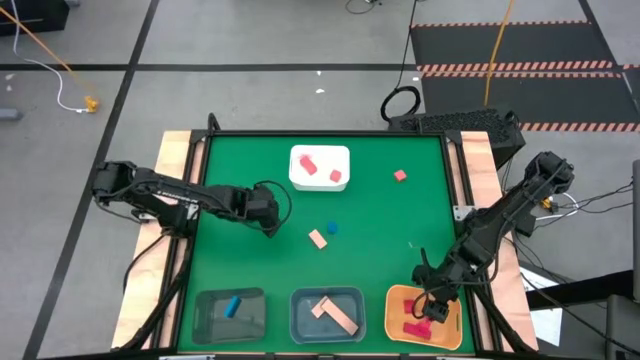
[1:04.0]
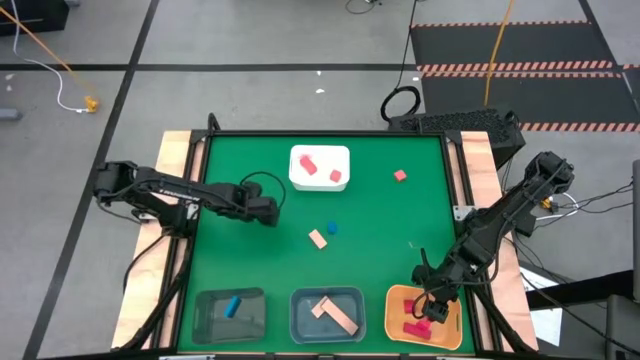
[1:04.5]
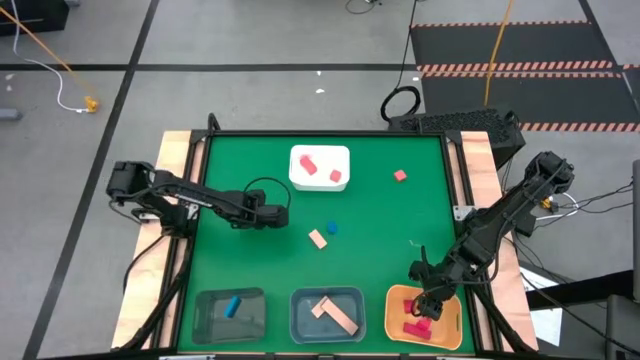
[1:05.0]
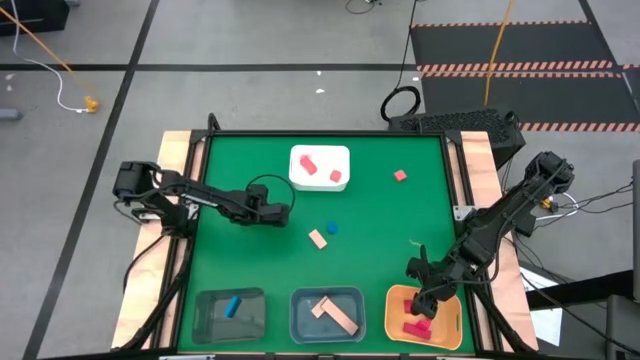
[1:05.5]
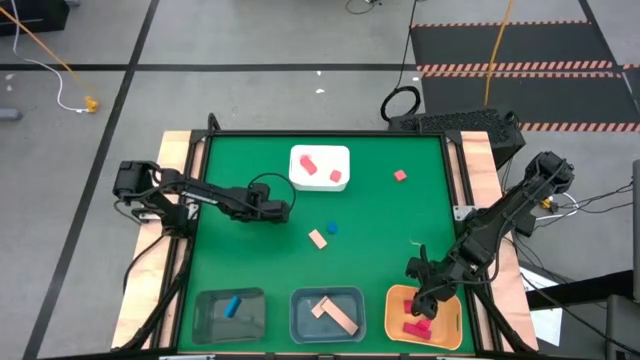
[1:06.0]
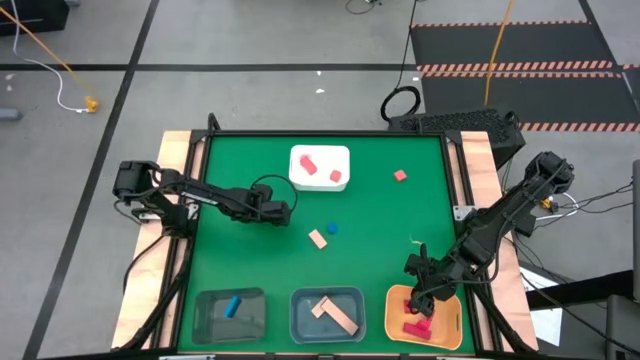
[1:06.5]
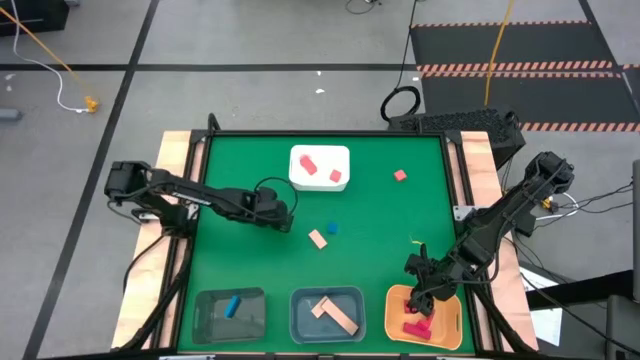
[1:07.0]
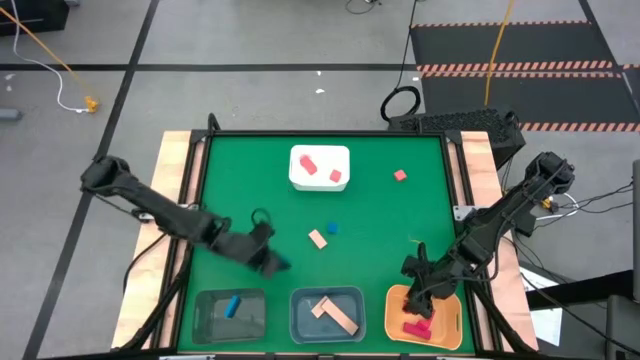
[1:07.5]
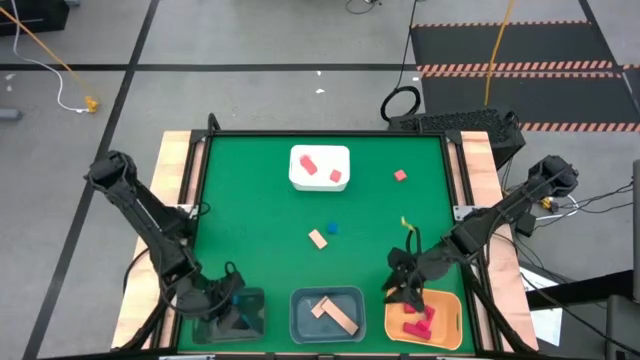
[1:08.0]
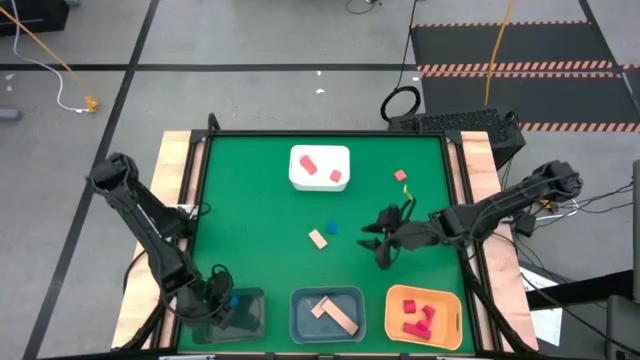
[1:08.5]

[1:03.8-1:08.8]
Task: Sort & place blocks by color
Put the left blue block into the gray bin

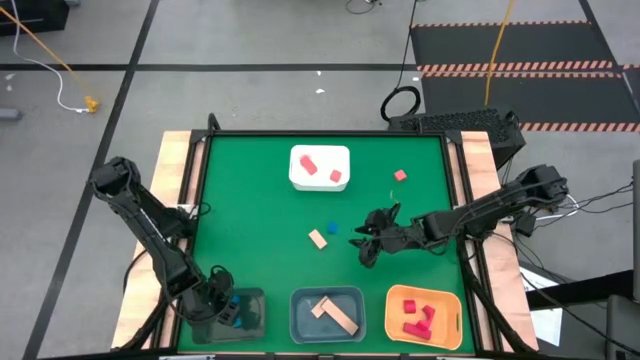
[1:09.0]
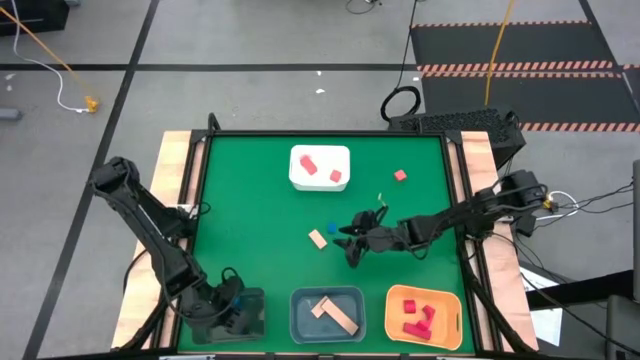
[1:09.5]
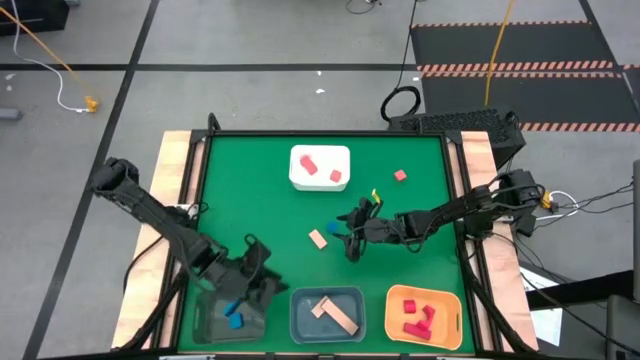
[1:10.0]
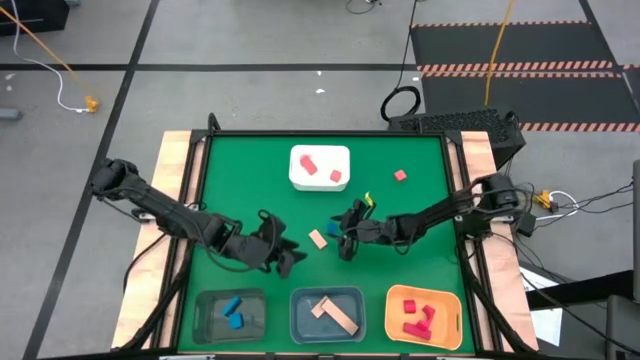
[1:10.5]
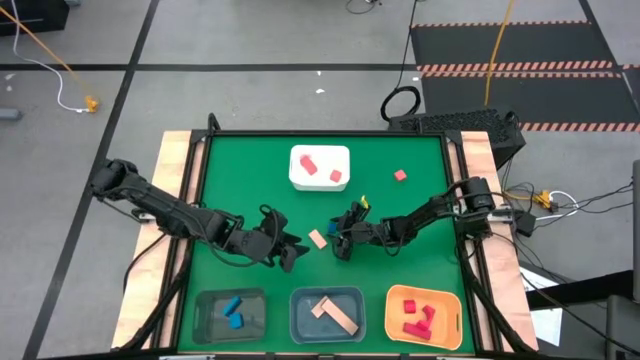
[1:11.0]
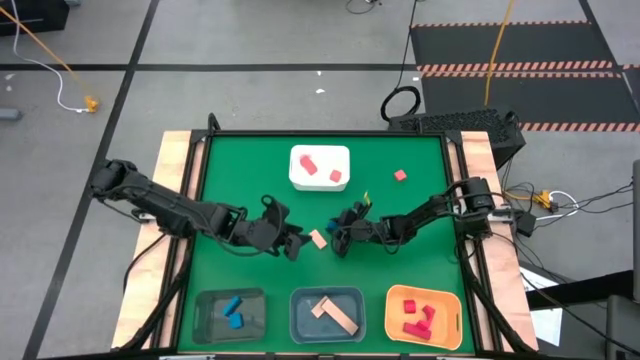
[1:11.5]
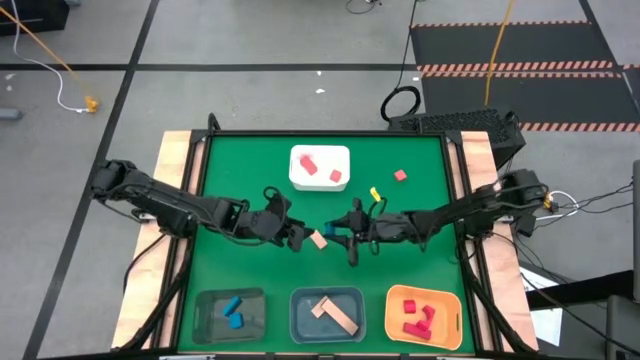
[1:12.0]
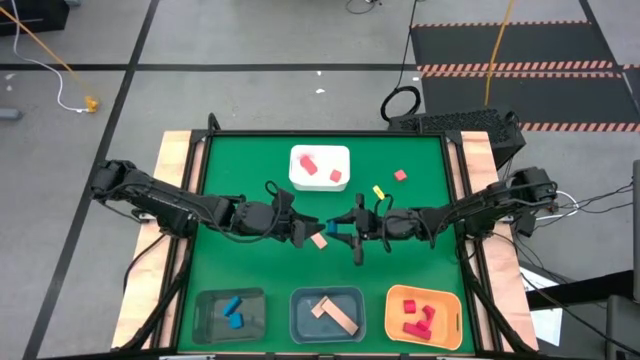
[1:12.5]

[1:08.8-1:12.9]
Put the blue block into the gray bin

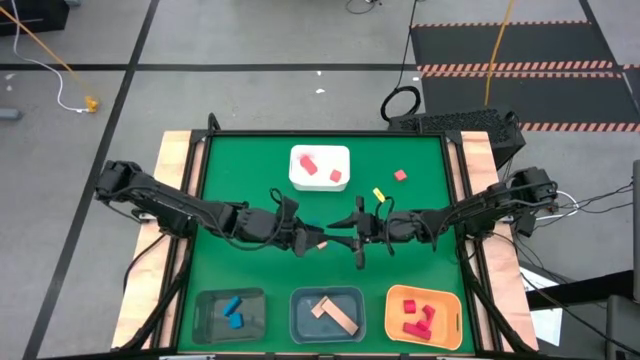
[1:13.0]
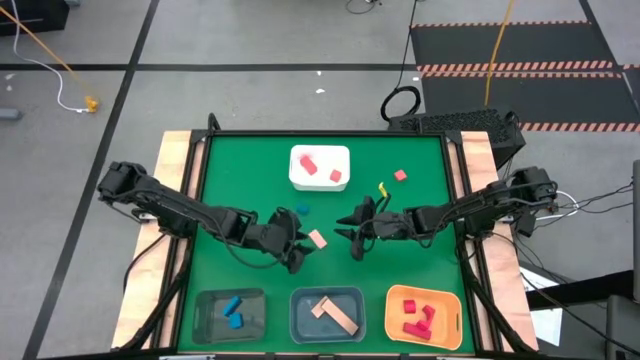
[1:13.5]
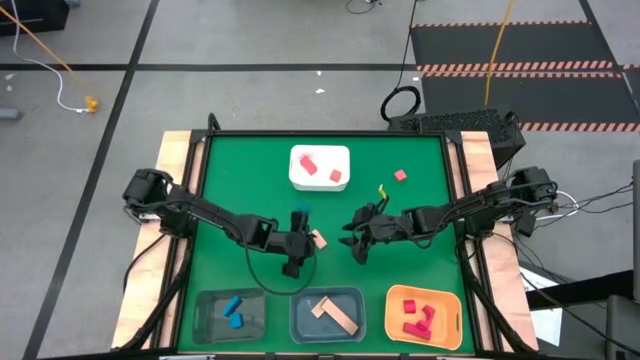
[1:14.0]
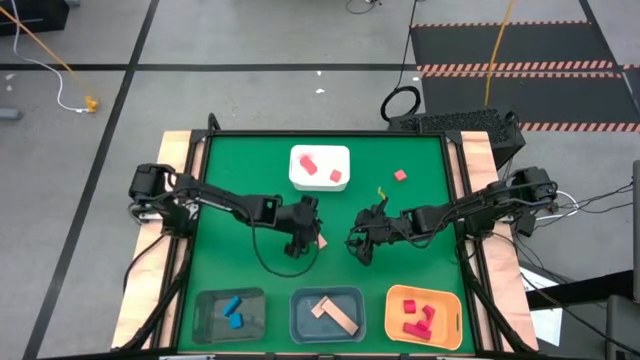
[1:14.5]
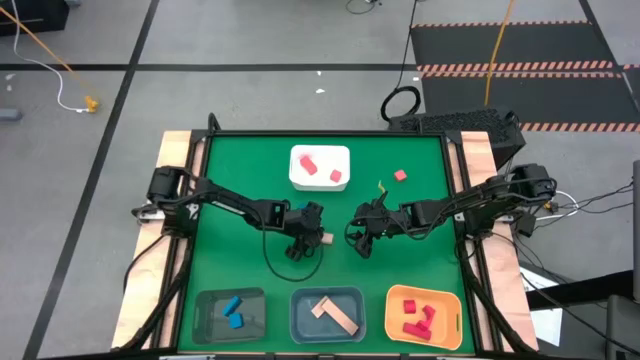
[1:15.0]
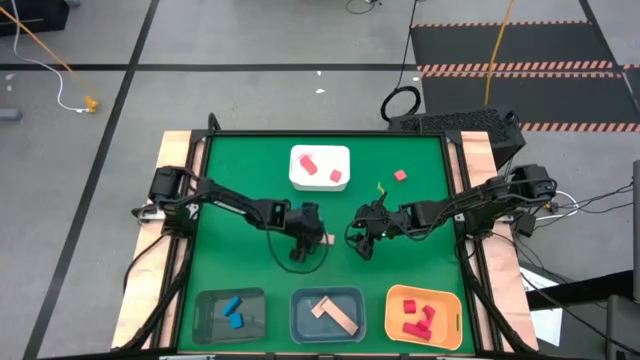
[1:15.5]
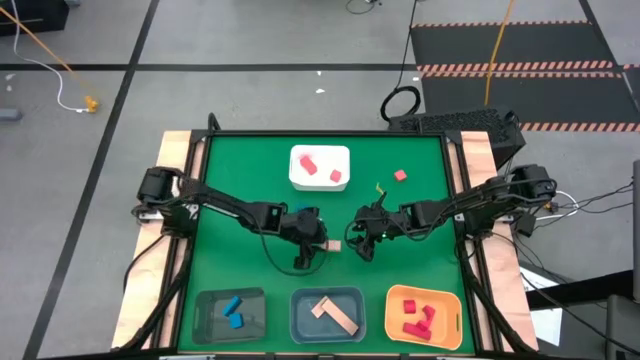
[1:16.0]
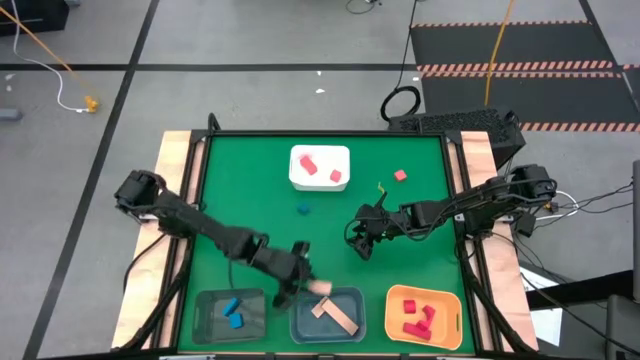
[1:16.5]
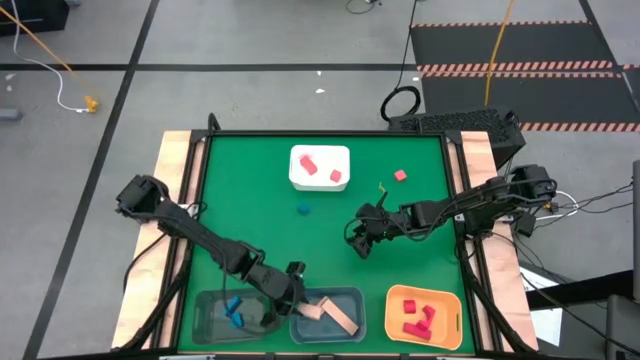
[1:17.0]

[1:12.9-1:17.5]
Put the white block into the blue bin

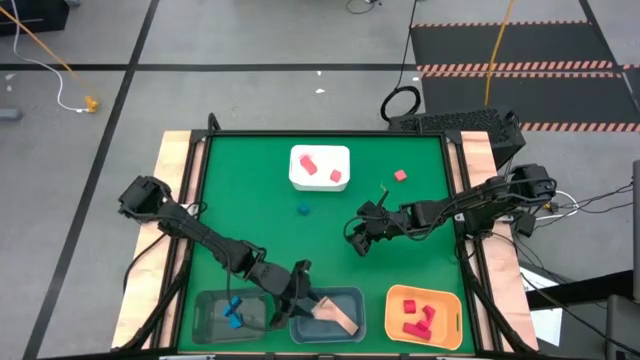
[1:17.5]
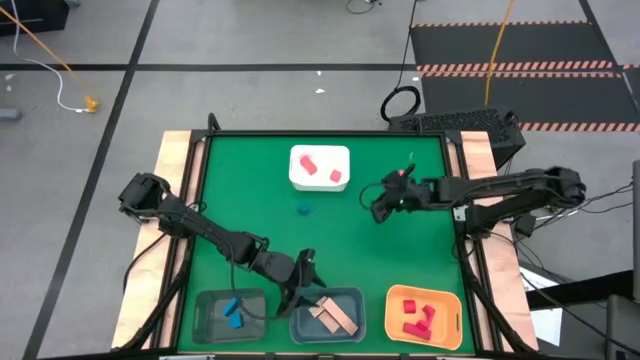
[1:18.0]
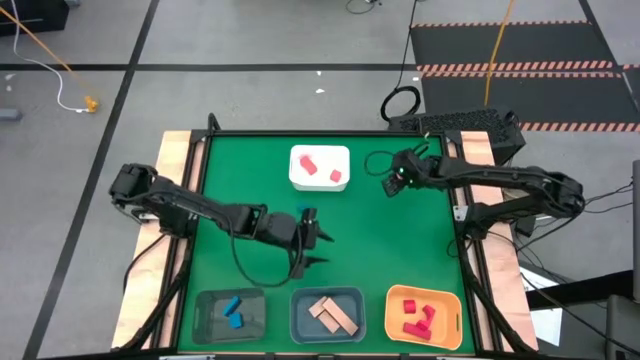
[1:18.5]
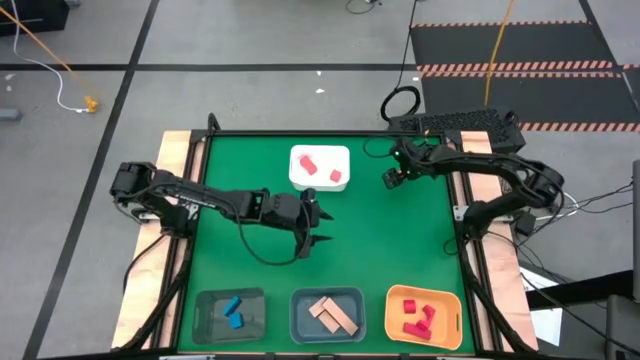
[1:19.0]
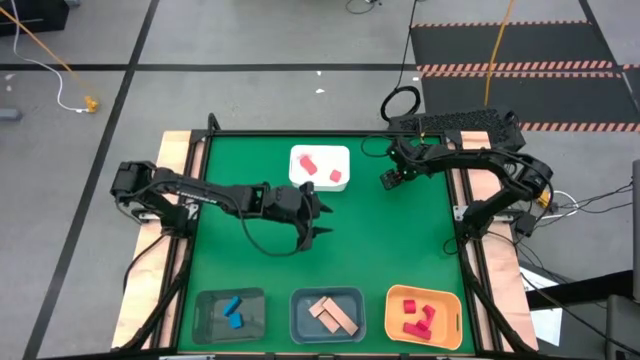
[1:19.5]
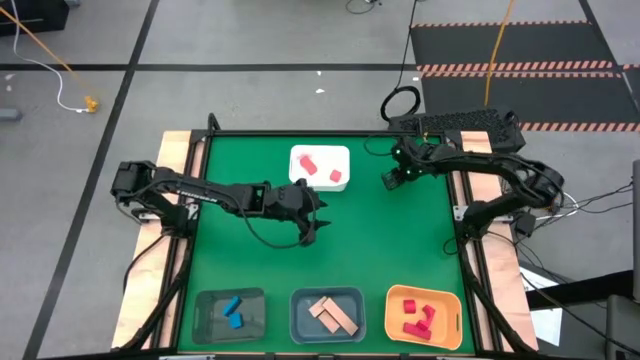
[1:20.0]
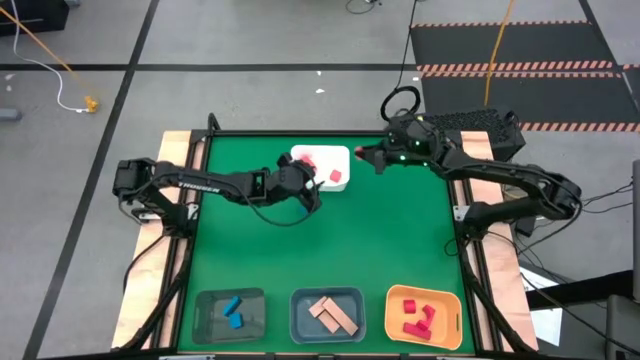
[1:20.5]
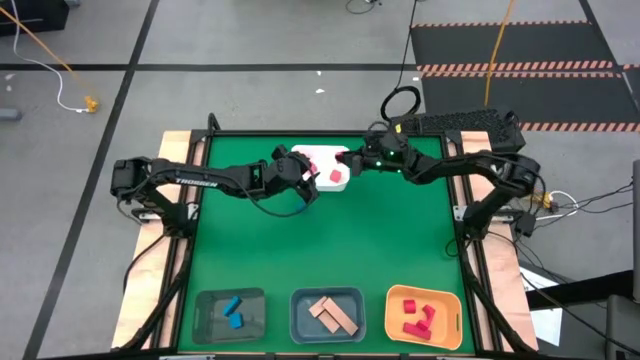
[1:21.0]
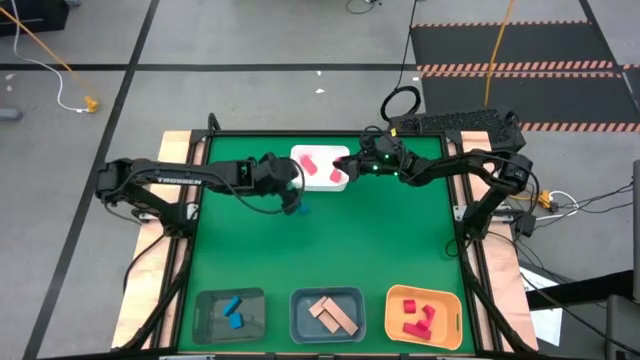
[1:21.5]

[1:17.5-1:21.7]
Put the pink block into the white bin

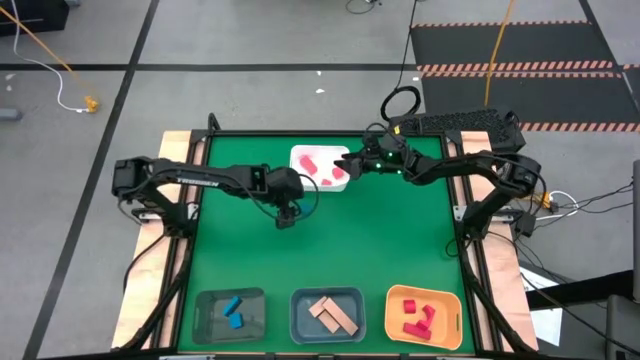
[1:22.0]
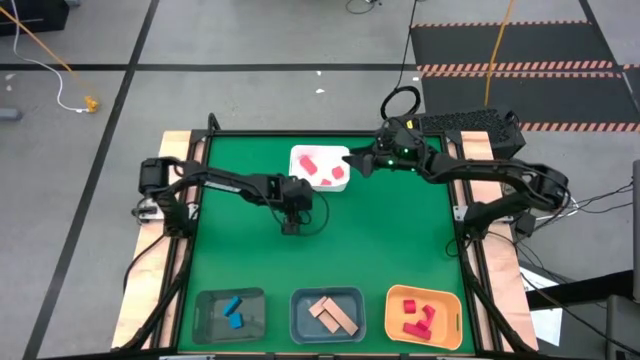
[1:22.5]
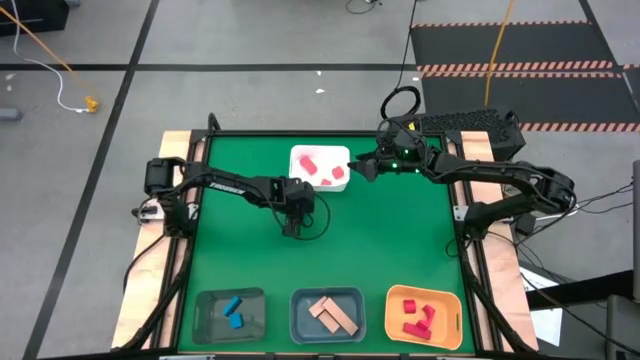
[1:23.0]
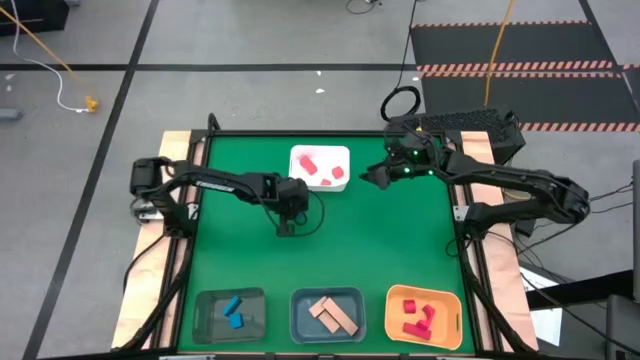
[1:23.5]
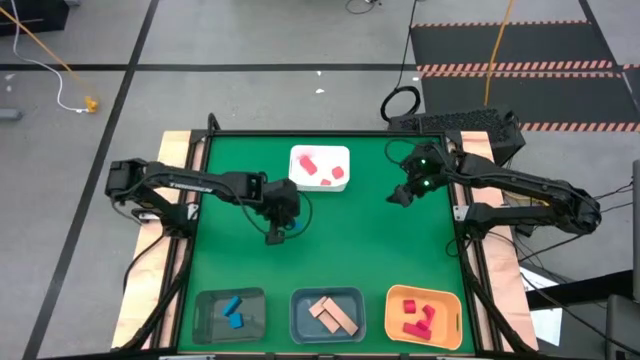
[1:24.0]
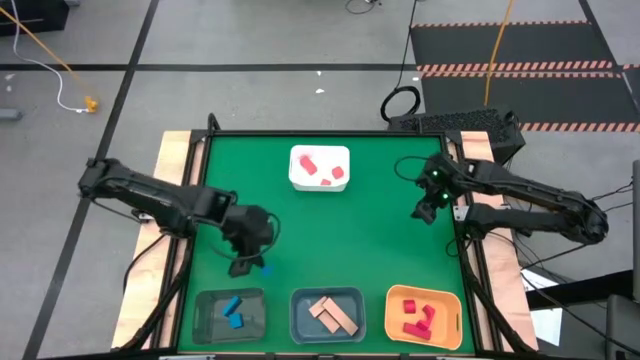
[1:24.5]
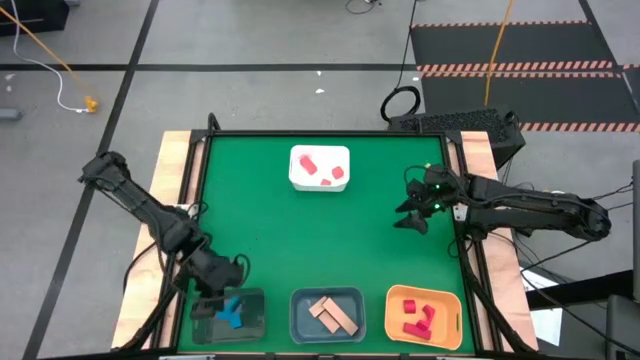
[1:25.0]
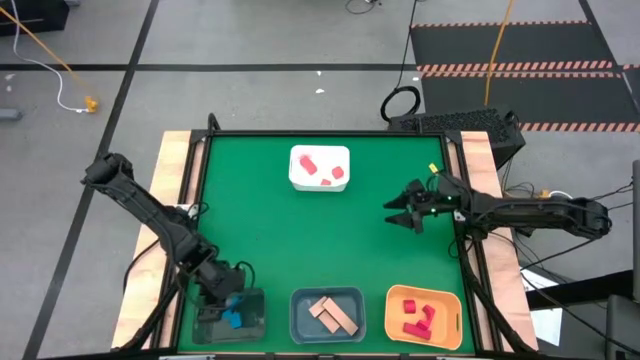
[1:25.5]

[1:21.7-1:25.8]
Put the blue block into the gray bin
